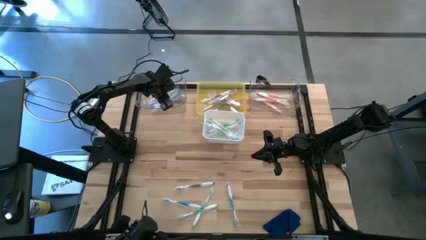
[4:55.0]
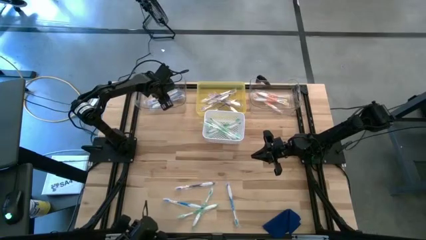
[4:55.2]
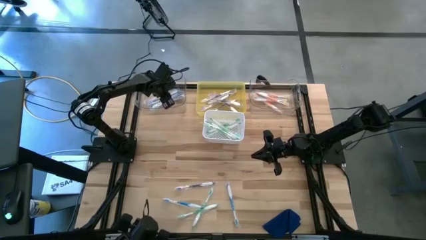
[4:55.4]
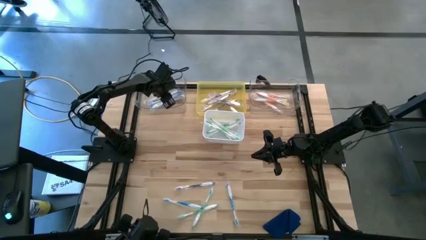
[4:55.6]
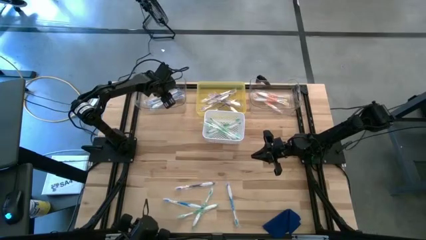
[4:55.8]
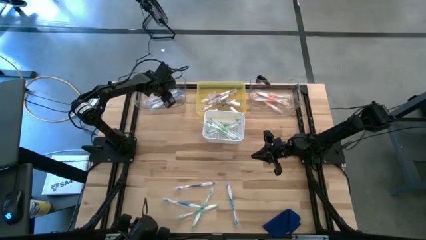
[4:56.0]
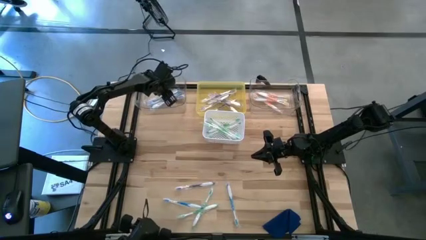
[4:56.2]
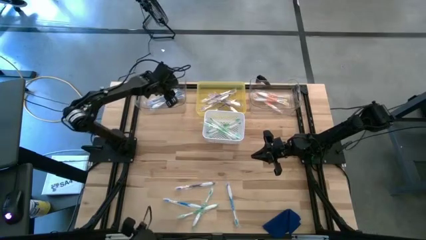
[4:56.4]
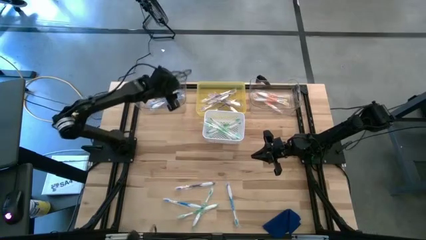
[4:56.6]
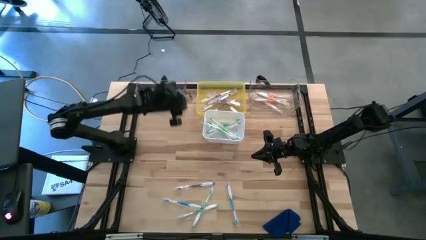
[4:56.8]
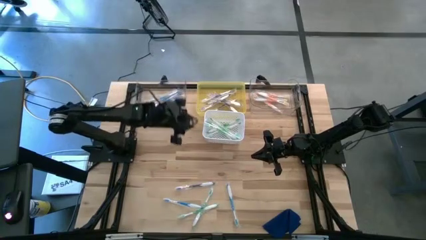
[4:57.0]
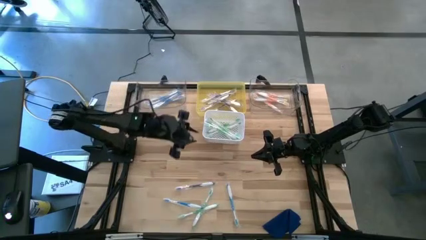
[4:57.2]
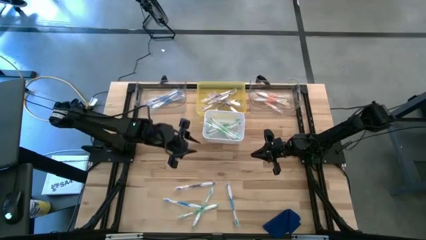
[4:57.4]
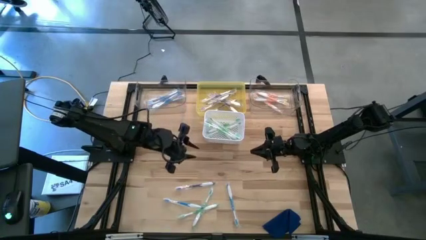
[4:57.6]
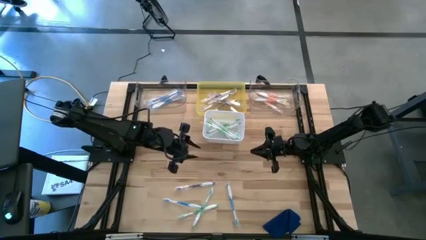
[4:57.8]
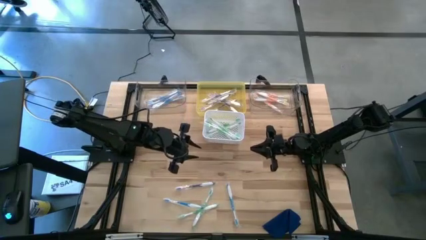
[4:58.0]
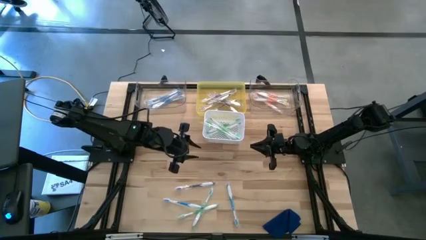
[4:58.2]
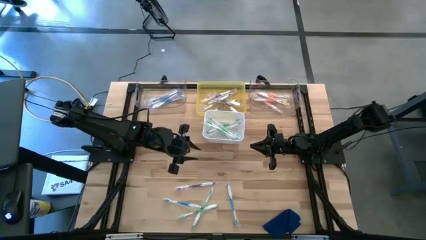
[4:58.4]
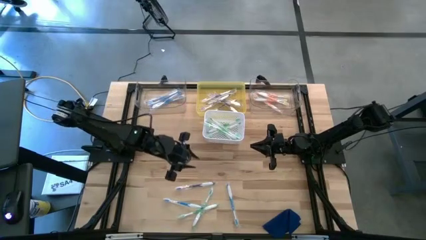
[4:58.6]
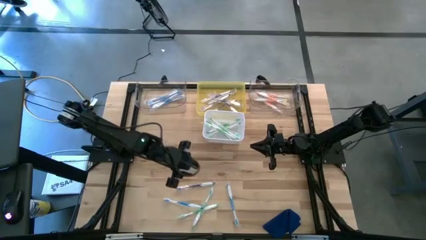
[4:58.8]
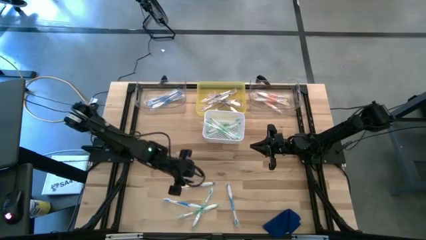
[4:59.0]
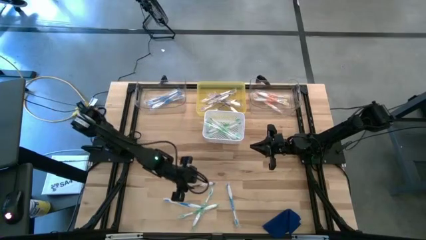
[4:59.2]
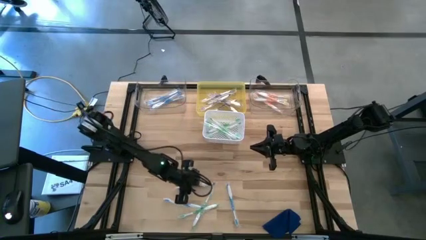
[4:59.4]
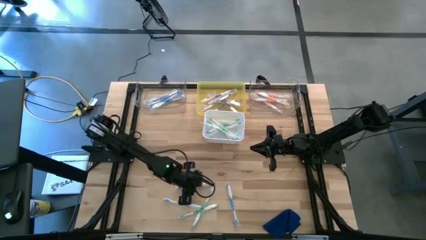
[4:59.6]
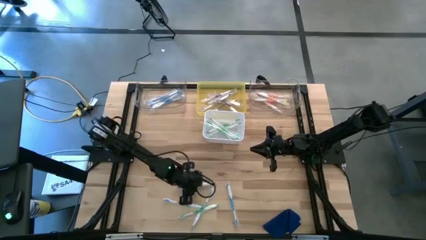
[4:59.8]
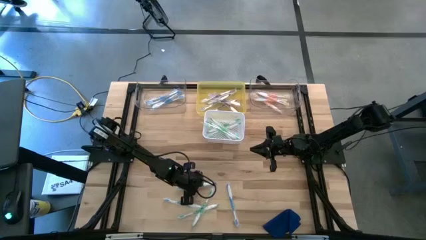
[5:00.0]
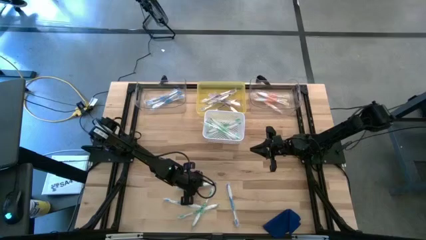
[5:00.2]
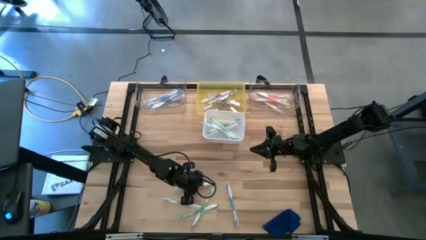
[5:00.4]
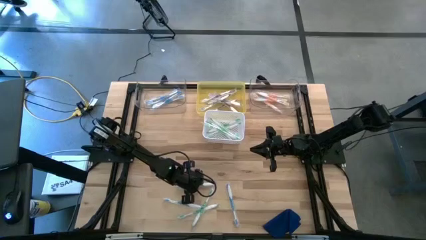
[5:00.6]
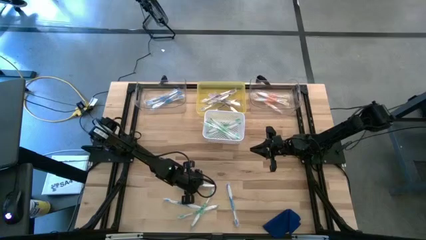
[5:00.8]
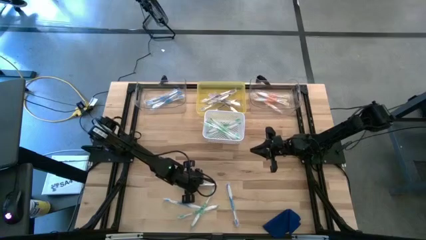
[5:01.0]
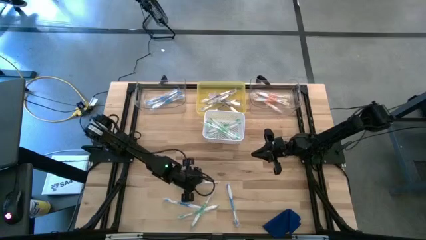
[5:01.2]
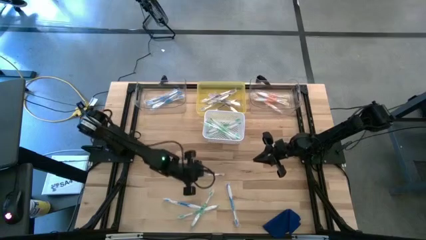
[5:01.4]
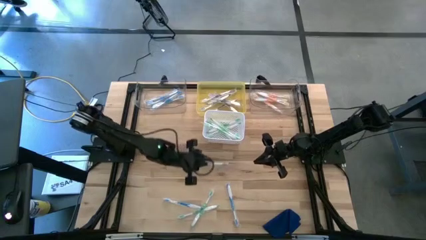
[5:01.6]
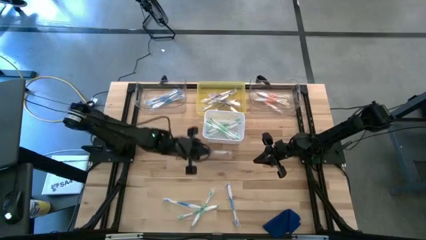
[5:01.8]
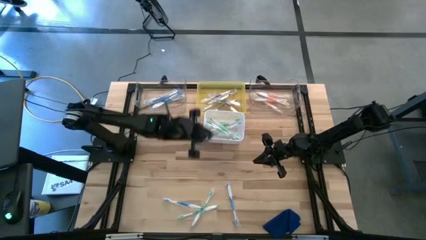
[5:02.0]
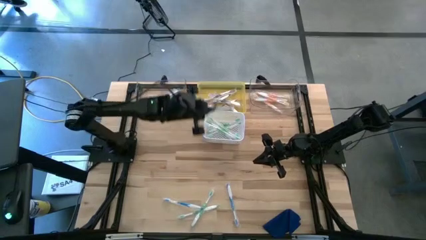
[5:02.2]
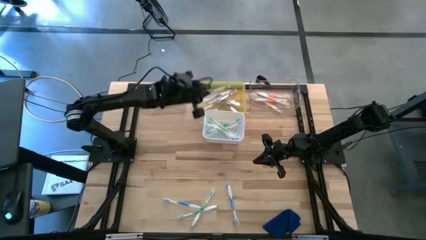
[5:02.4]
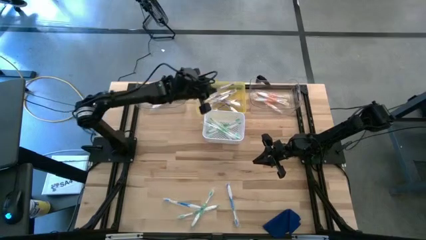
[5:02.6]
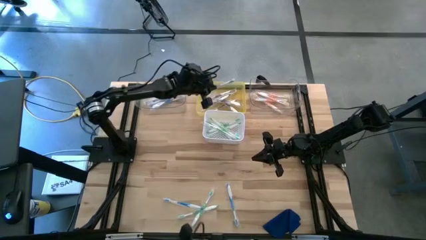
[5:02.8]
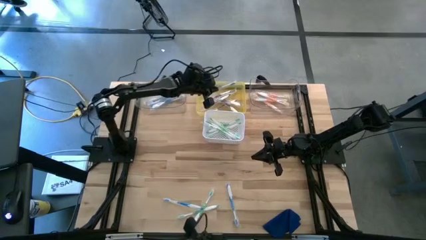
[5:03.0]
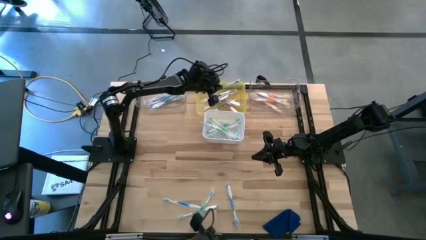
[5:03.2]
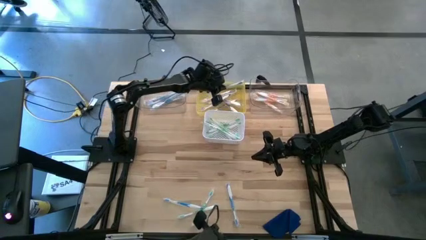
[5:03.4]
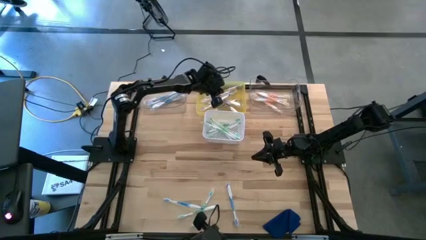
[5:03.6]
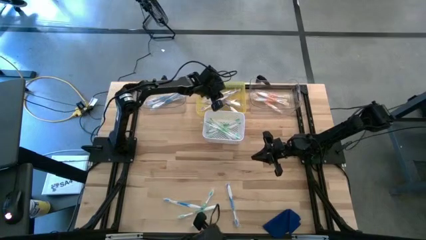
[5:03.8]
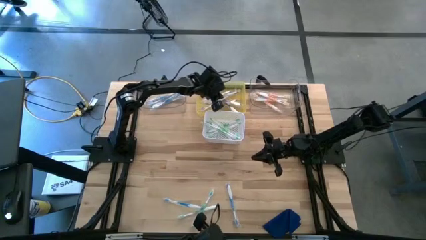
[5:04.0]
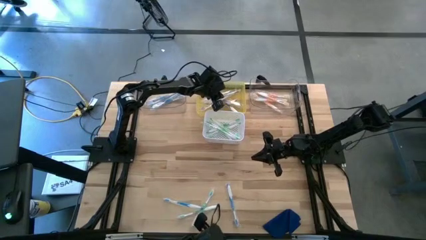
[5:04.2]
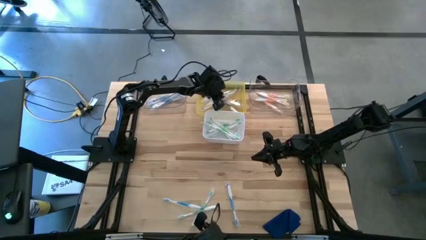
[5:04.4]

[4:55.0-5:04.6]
Task: Pick & Place Toothbrushes
Put the purple toothbrush into the yellow bin

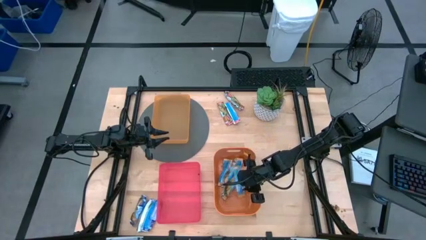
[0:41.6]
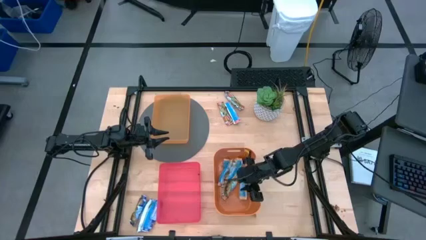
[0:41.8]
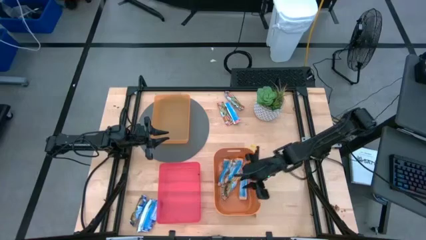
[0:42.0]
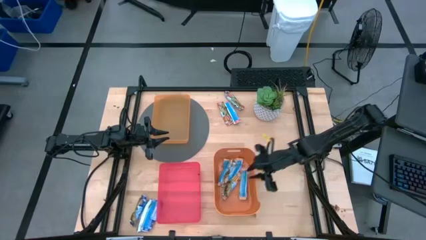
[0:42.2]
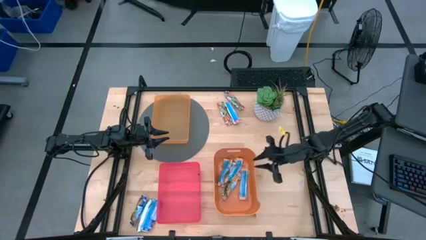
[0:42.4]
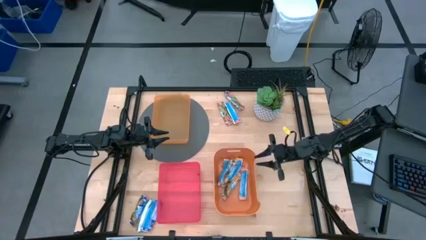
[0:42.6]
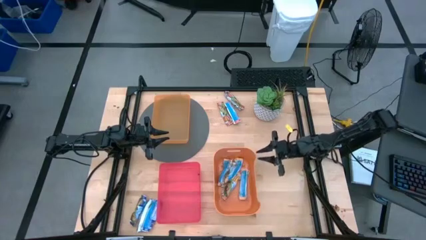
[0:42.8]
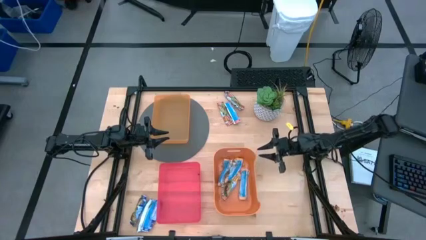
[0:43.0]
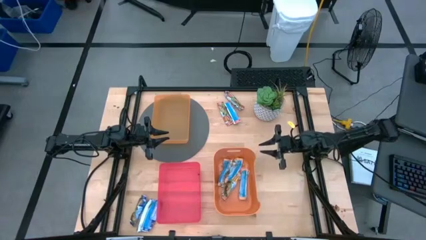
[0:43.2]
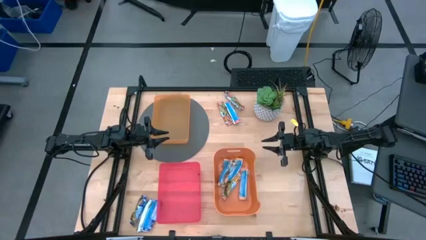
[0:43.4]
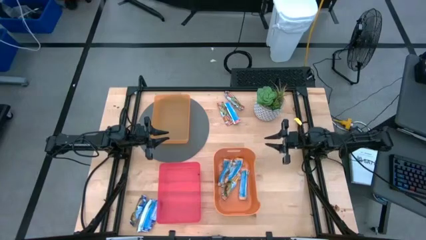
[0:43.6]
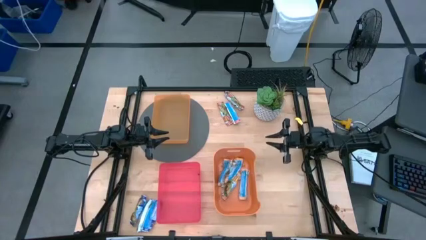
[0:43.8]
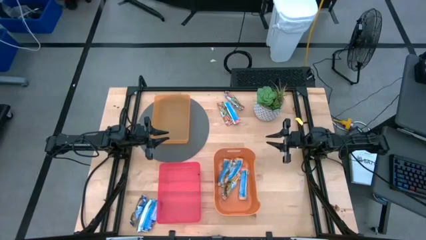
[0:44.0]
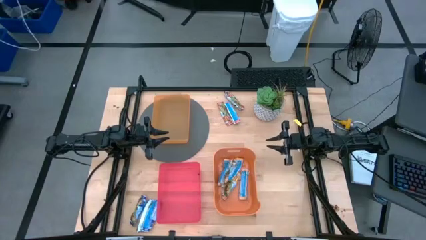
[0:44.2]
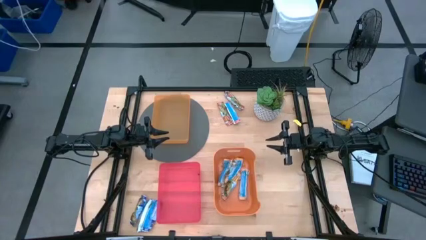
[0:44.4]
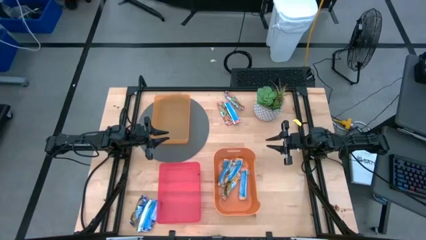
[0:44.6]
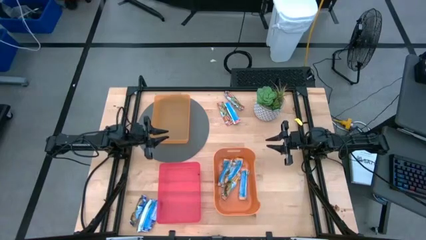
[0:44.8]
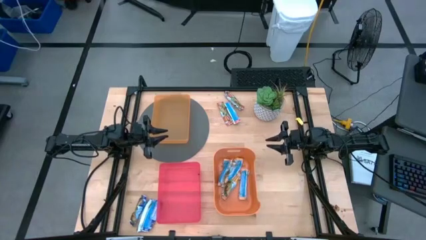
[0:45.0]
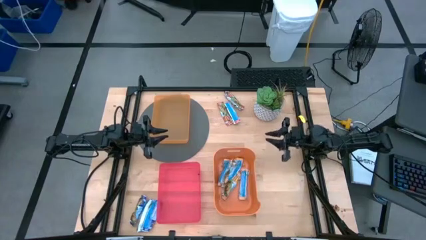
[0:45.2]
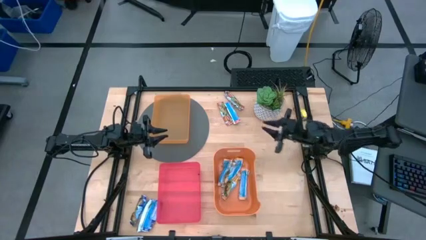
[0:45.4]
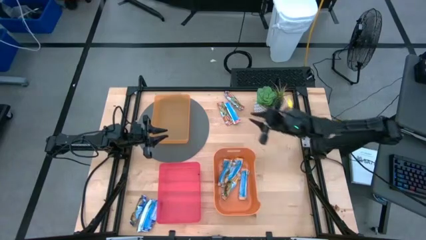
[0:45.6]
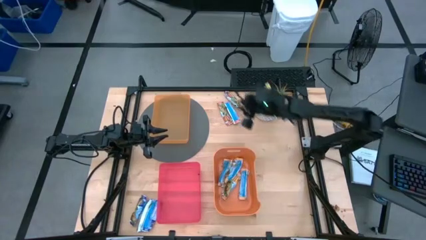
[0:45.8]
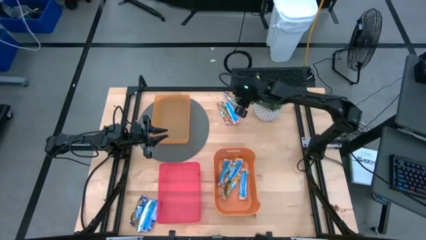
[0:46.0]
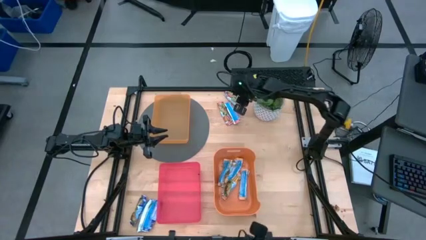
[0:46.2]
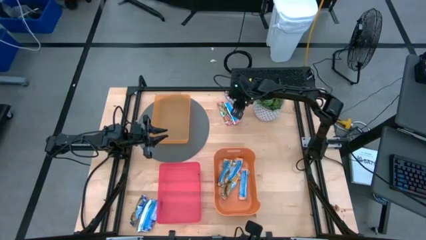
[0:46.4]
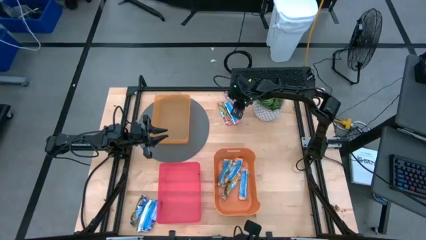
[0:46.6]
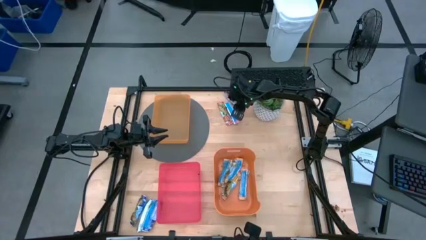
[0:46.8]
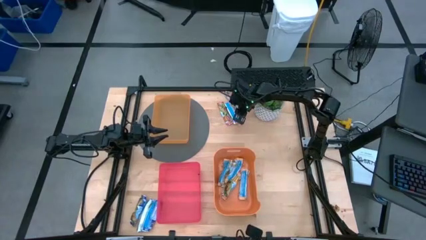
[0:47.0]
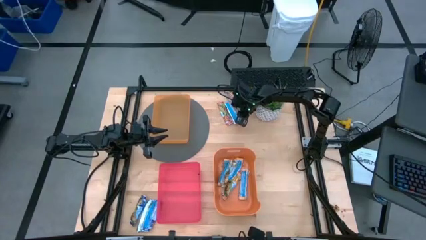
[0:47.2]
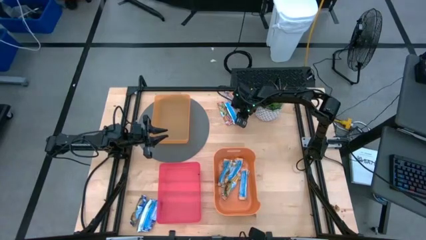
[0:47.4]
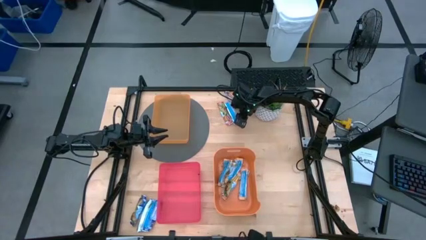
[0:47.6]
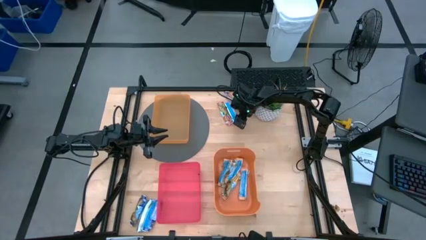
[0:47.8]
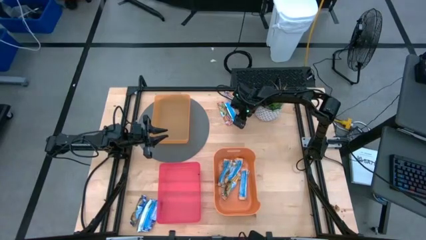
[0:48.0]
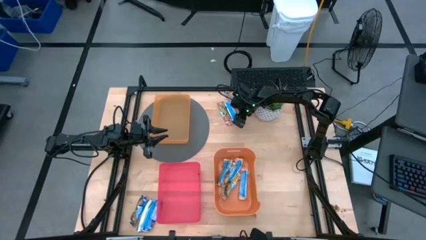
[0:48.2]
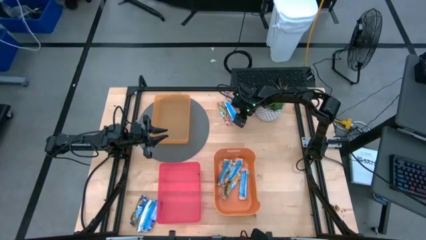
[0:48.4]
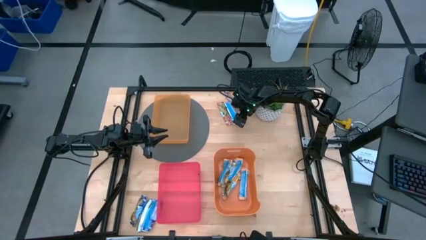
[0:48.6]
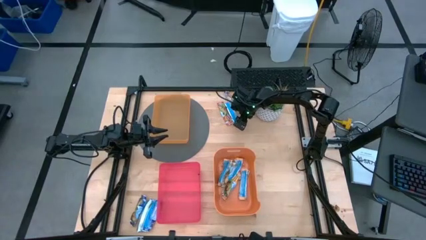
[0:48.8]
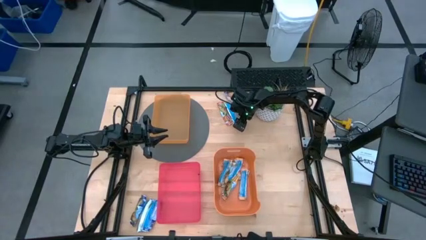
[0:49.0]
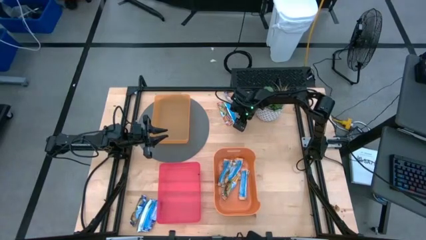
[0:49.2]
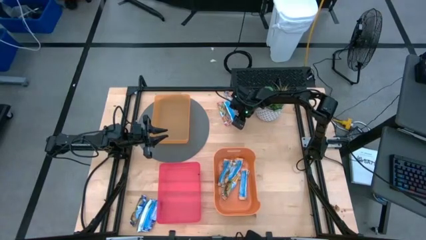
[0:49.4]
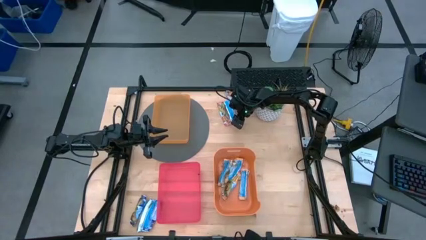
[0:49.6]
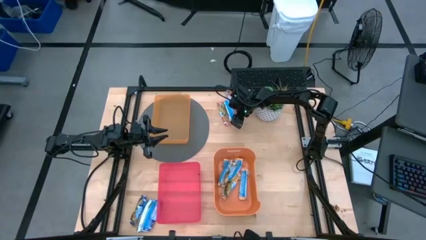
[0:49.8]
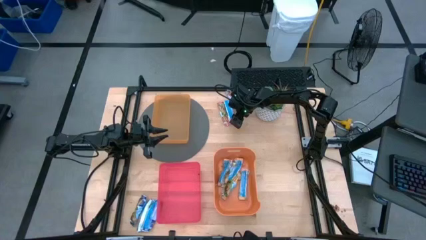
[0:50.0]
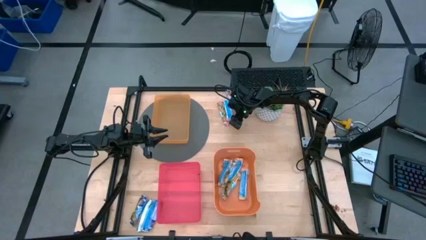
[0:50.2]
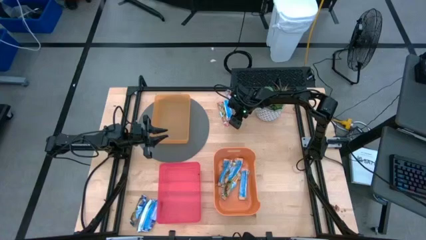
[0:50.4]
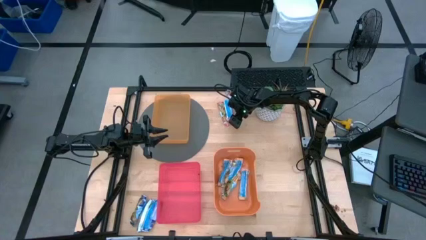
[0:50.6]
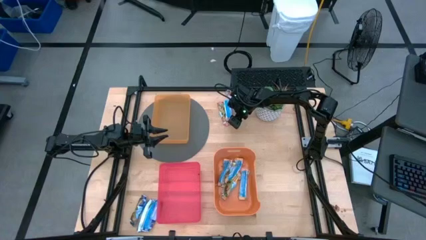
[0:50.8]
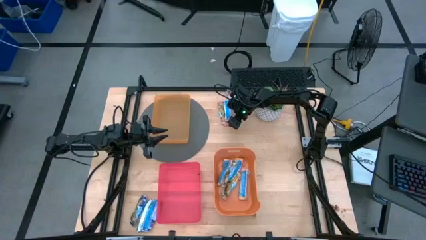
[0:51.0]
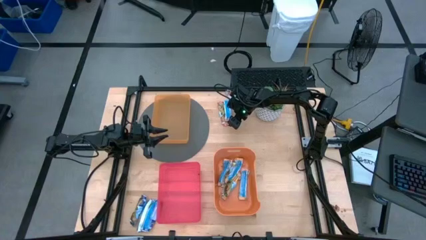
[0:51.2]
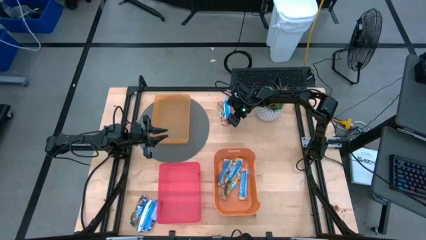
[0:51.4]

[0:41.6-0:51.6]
Task: Pick and place Granola Bars by type
Put the red granola bar into the light orange bin
